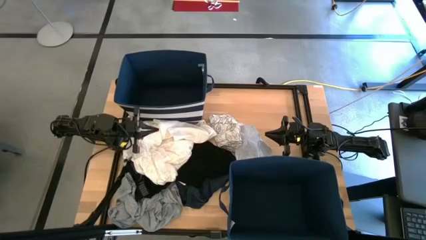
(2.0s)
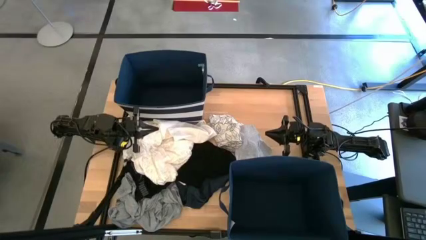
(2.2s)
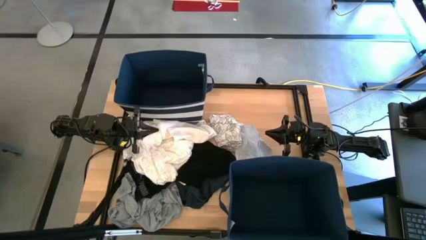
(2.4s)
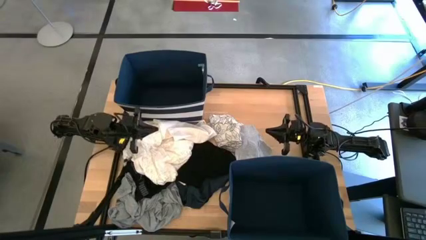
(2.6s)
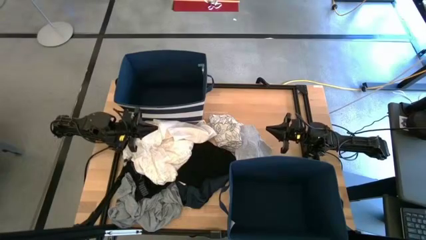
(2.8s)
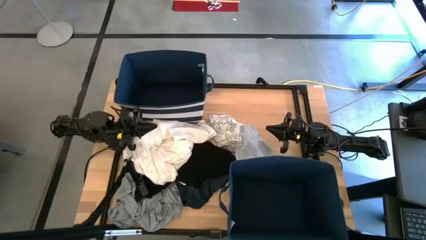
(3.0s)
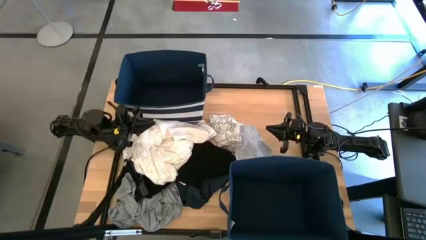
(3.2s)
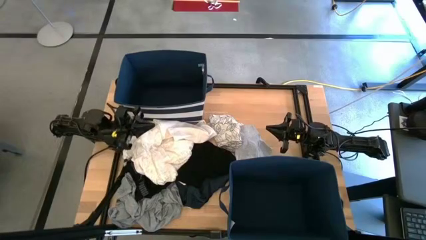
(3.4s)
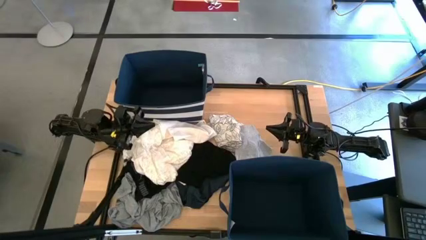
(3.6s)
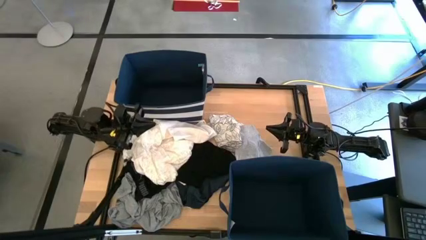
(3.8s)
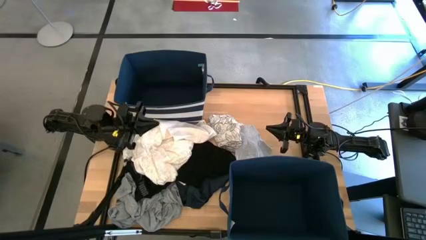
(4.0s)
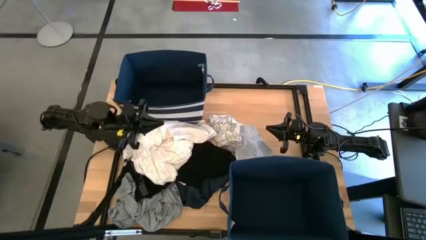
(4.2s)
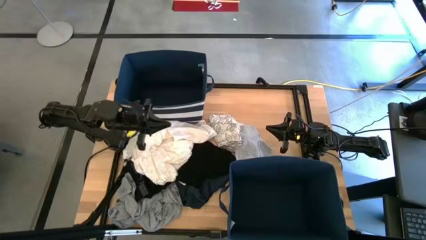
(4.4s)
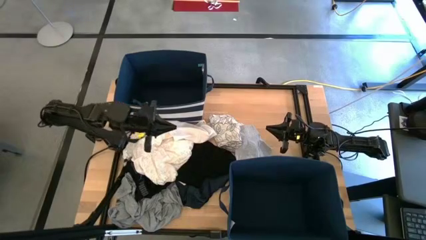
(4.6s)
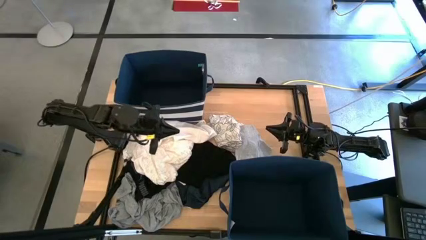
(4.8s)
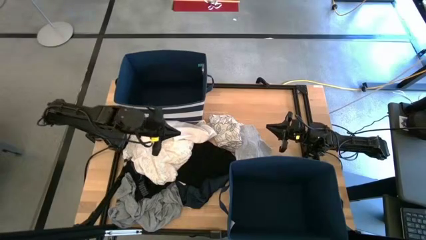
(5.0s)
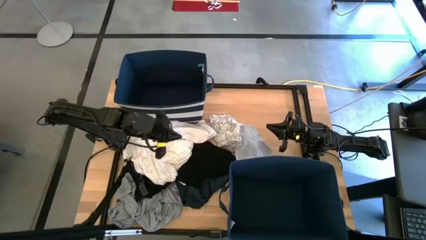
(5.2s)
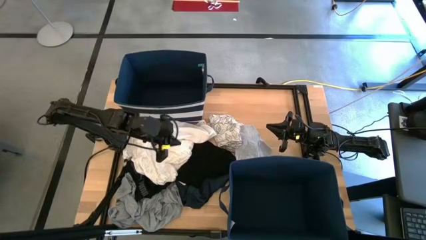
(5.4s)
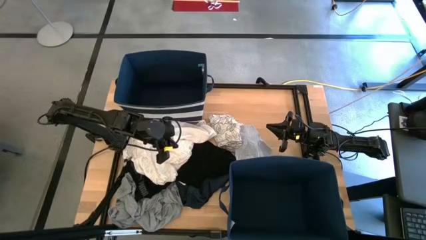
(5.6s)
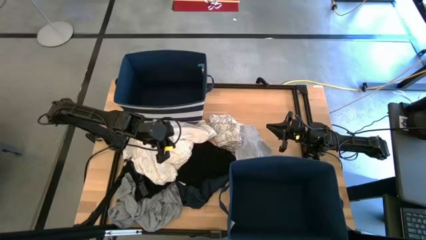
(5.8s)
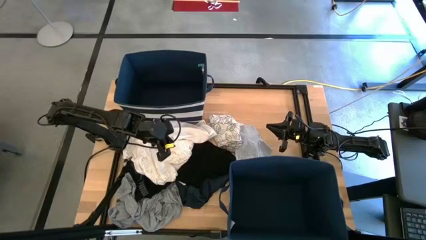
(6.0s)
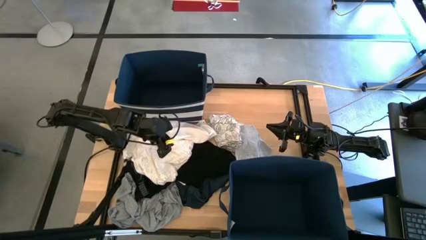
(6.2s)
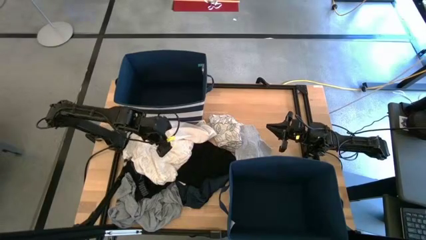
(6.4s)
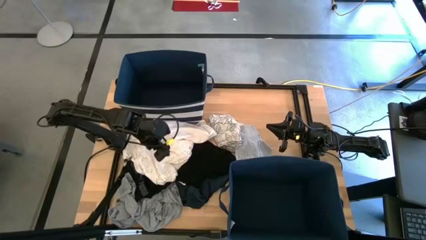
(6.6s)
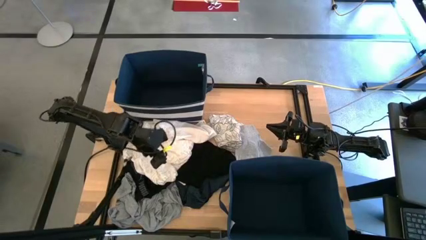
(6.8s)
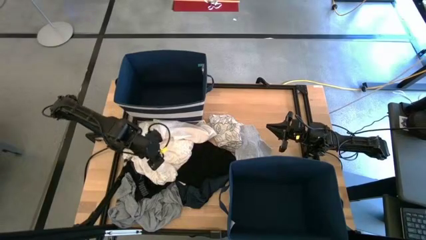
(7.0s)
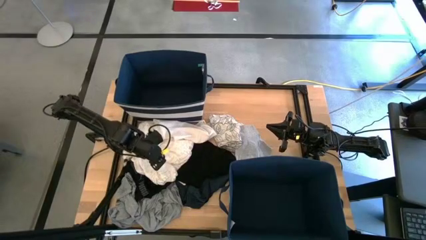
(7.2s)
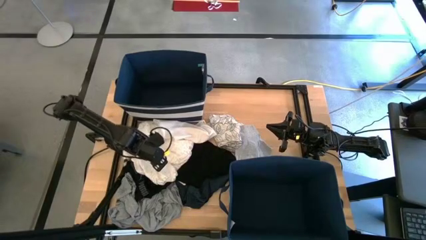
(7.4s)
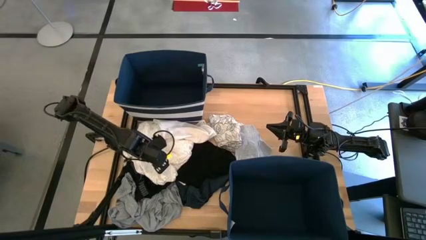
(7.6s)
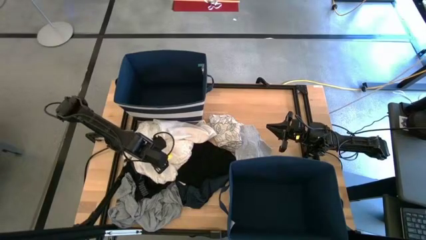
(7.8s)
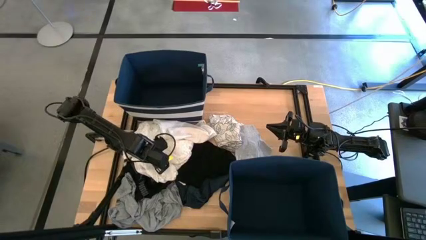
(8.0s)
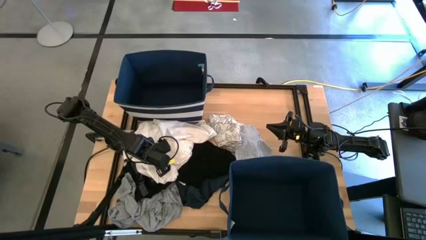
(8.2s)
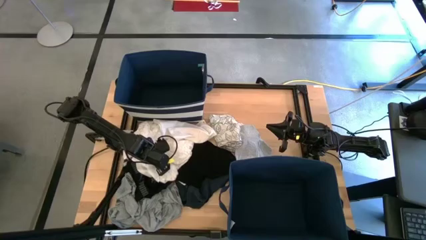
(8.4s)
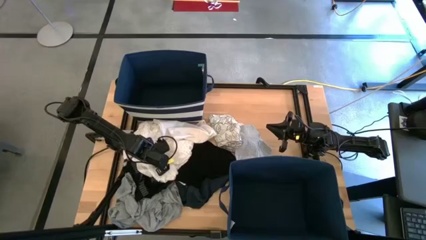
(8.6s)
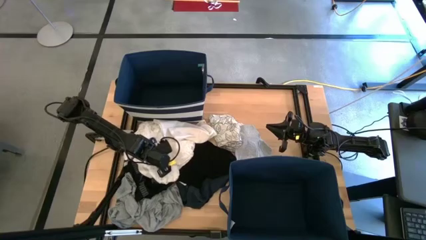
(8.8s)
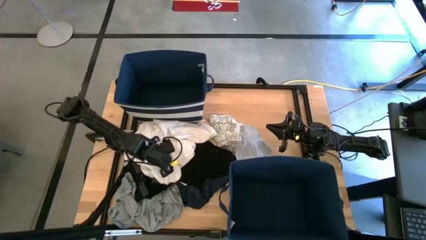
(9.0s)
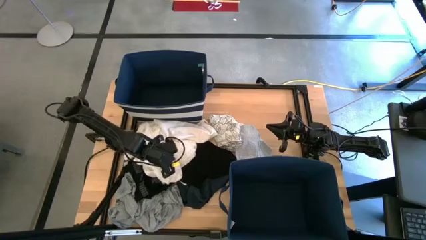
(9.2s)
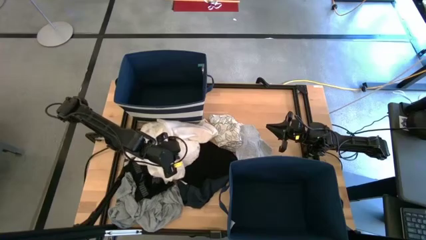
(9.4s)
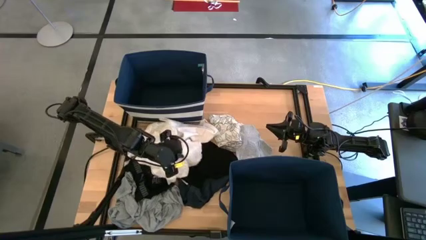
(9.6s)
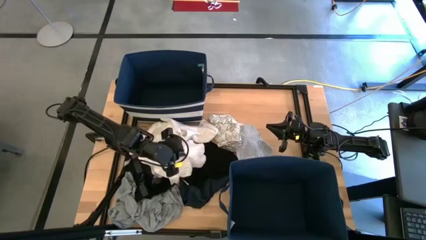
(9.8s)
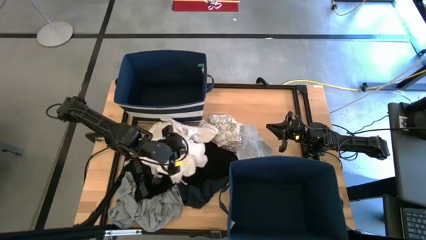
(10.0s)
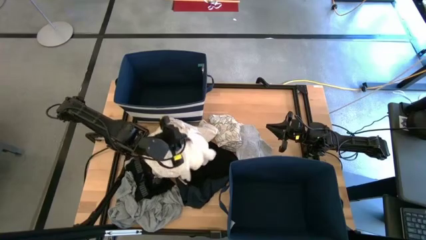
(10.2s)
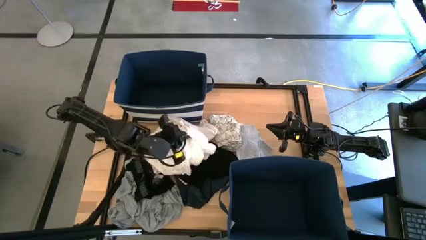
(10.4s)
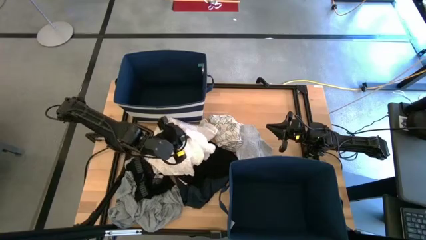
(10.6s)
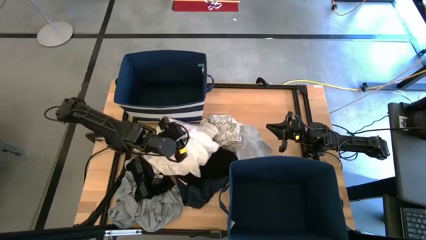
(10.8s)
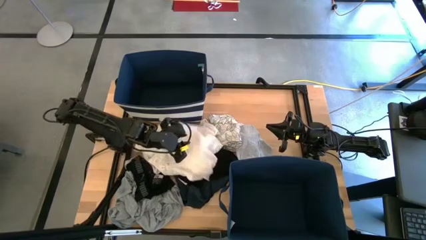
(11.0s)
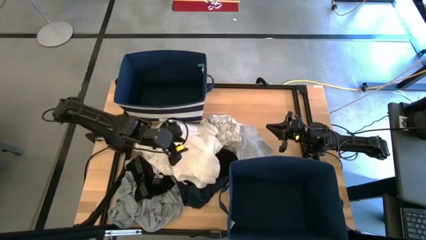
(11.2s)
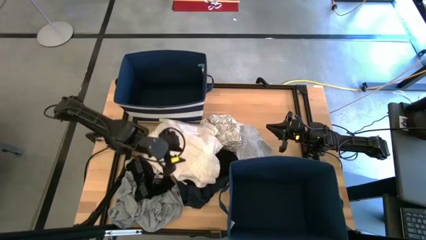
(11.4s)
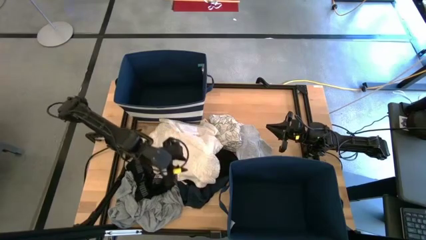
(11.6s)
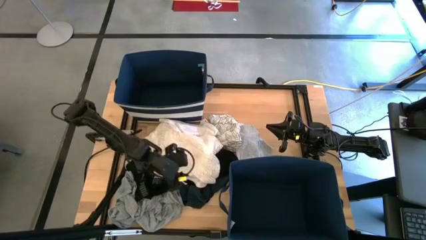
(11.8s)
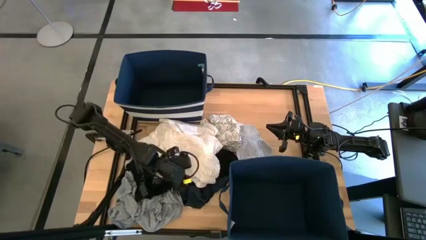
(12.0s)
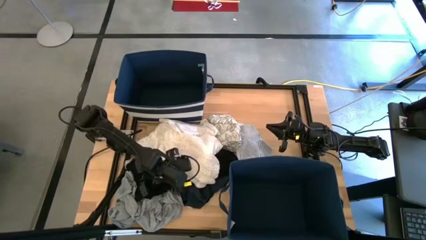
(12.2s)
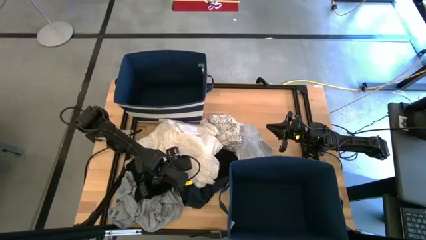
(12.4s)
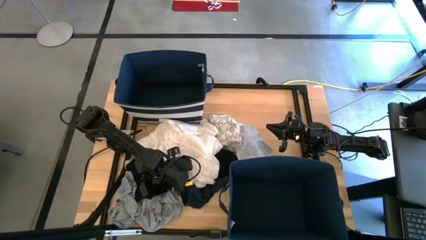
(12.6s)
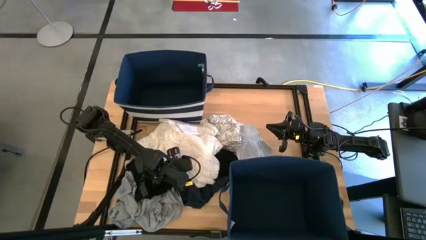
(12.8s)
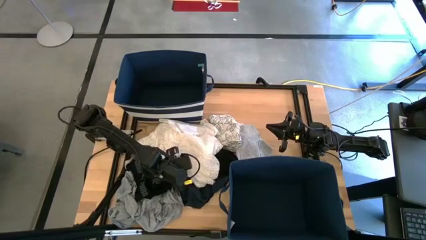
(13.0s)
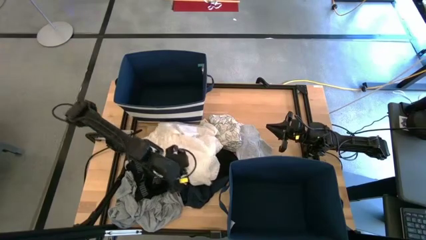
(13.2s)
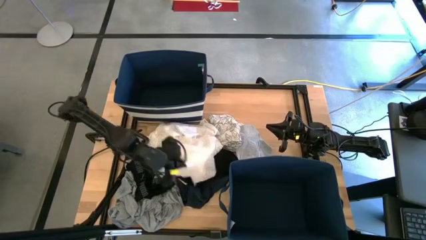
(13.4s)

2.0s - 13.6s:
Task: Sort clothes
Put the white dress into the top blue laundry organizer

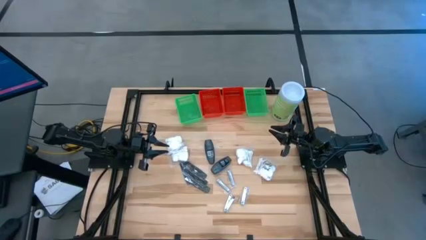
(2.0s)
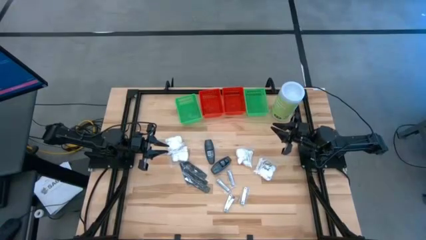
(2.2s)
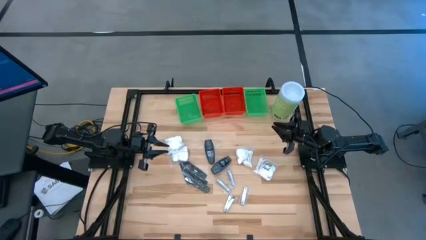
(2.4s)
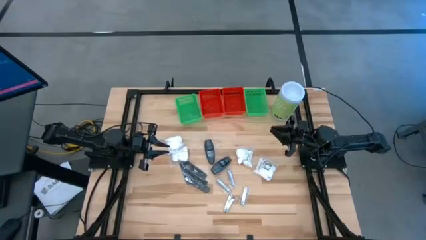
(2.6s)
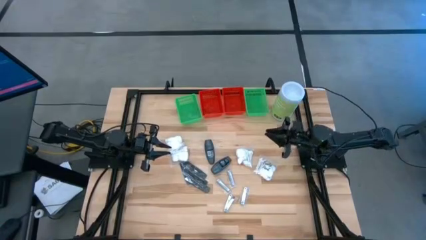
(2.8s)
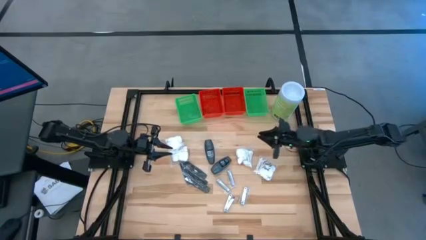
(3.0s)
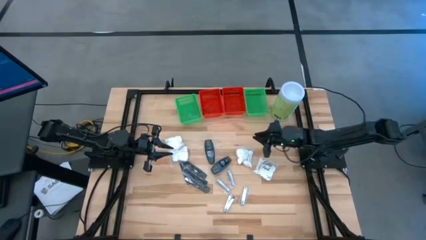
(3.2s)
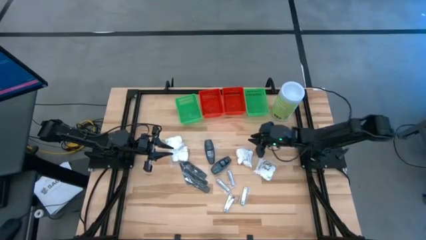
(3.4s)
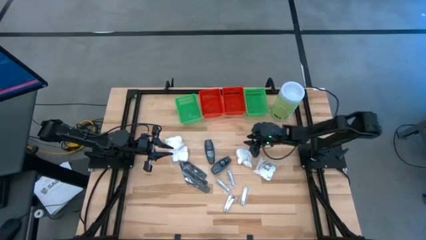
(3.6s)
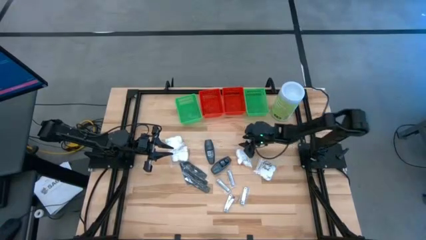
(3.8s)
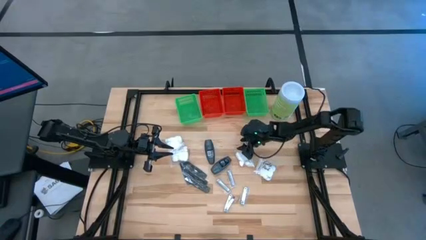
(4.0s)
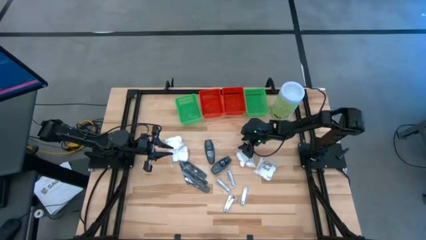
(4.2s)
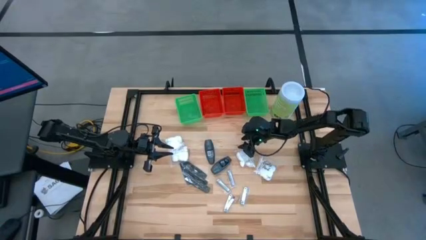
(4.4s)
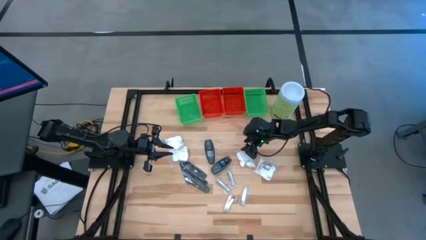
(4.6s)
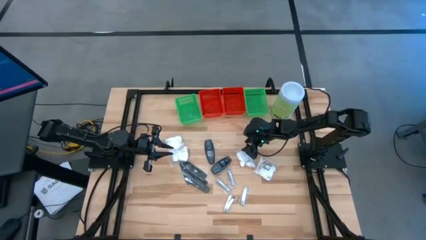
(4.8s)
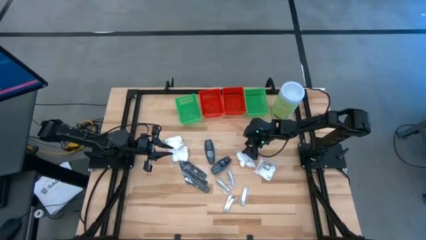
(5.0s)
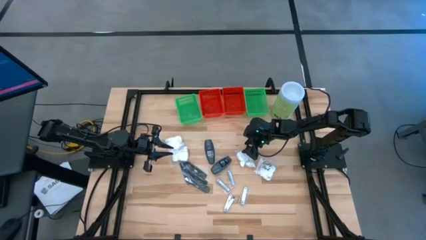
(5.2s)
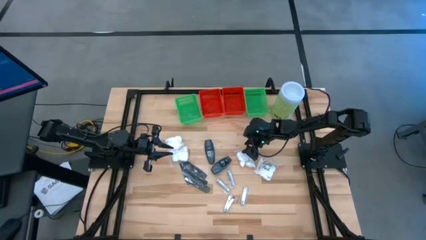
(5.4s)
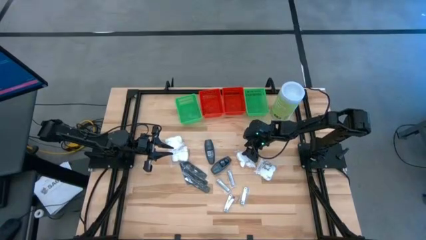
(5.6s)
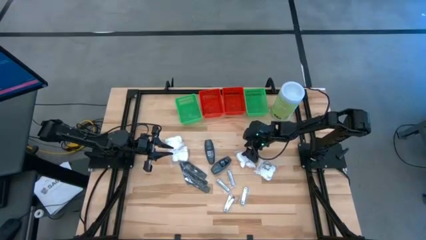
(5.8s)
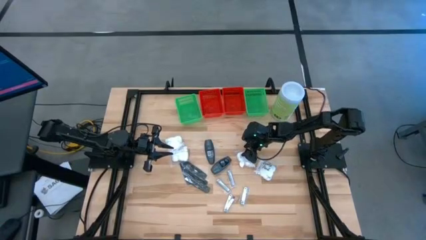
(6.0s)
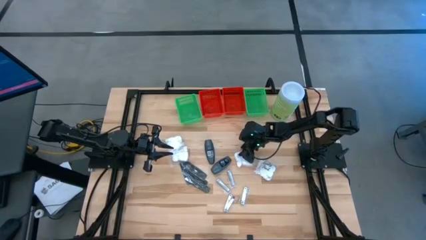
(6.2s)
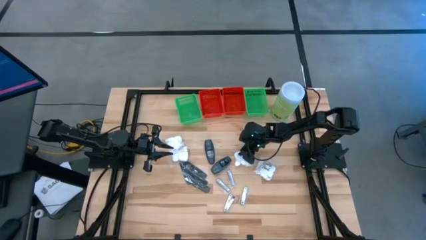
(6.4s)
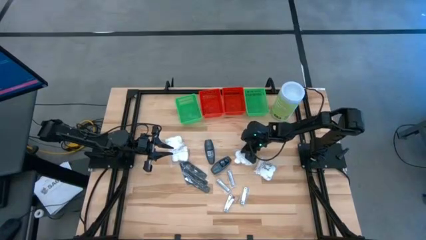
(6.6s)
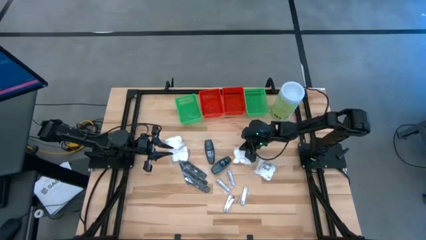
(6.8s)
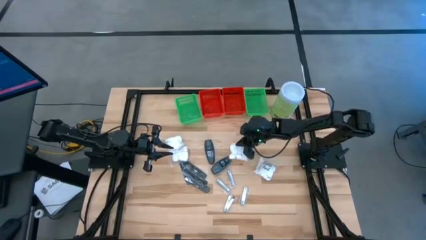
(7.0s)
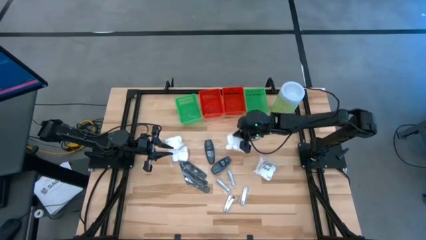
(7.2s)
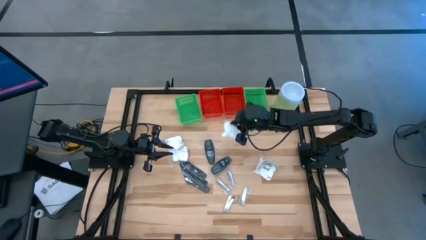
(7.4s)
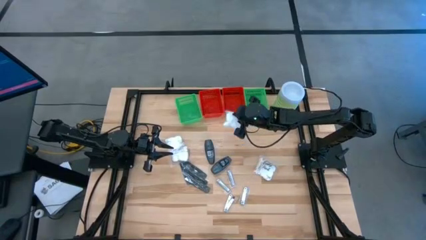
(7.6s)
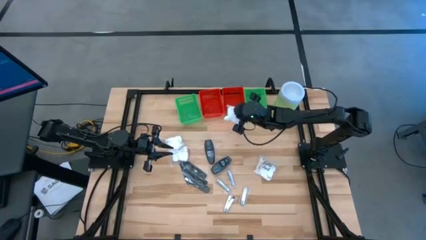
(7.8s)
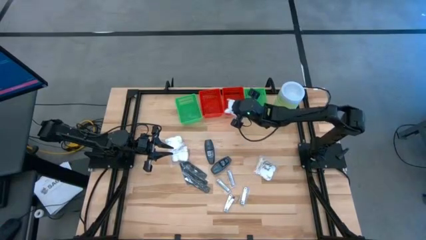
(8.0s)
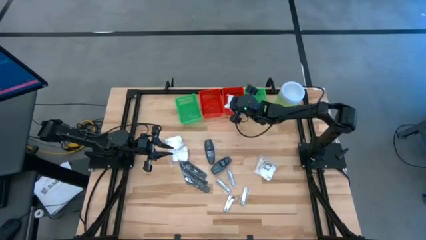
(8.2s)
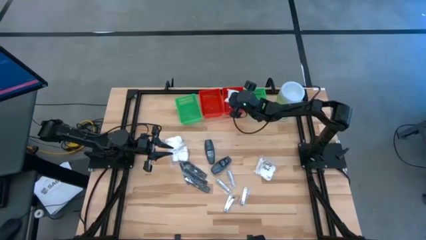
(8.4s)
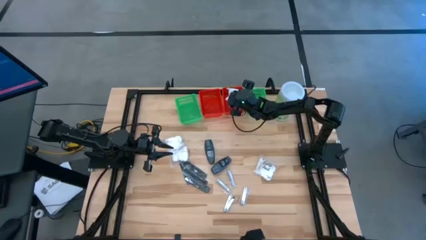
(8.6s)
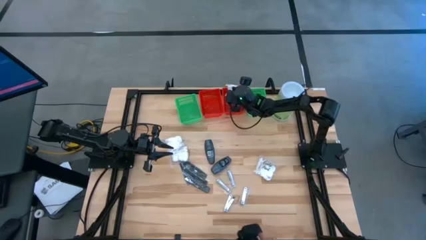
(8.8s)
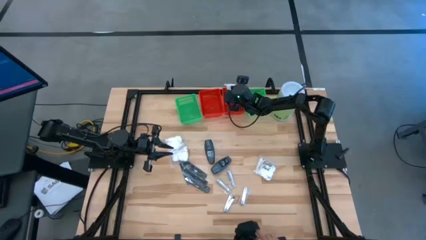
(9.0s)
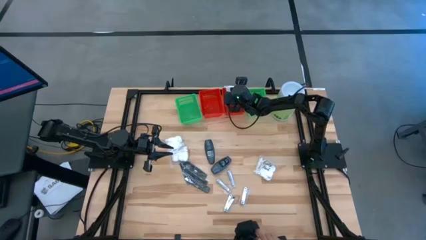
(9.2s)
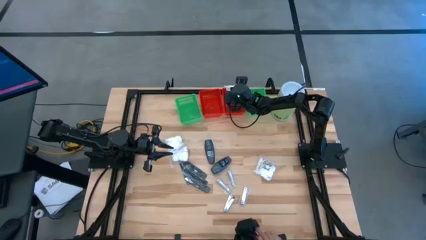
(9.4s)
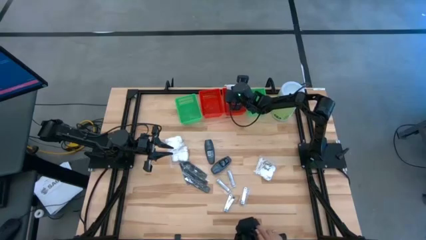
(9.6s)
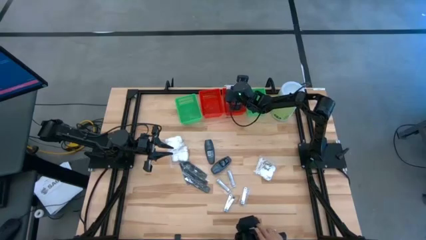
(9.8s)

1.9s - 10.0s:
Task: Pick & Place Travel size toiletries
Put the white cotton pack into the right red bin
